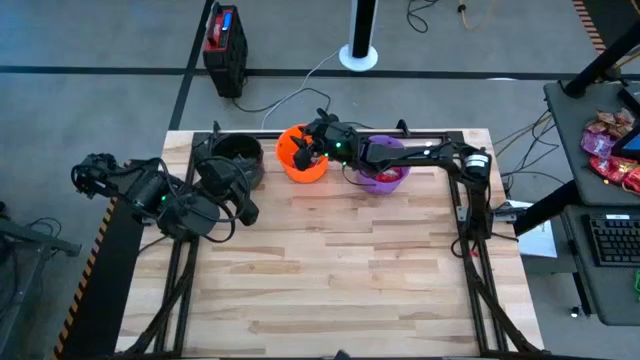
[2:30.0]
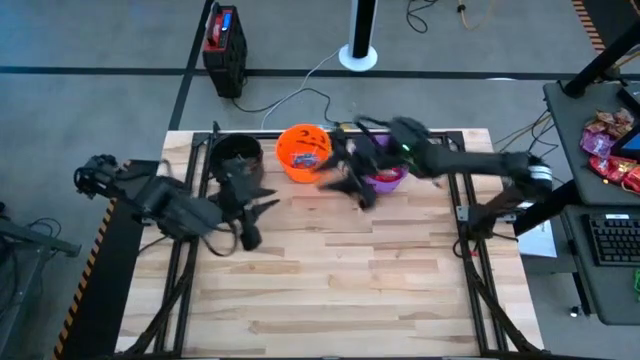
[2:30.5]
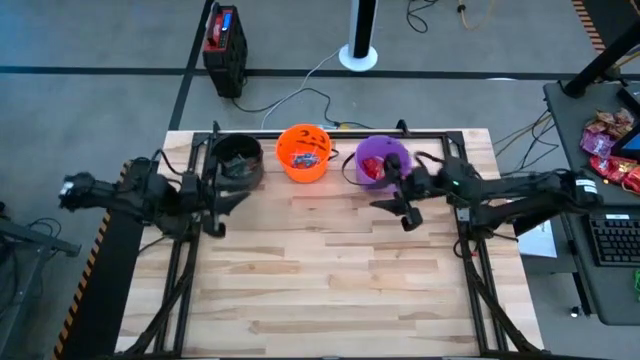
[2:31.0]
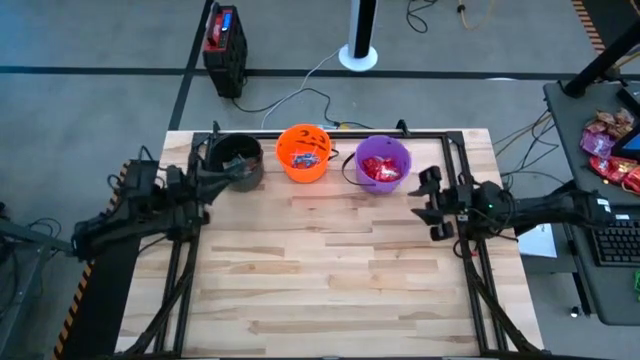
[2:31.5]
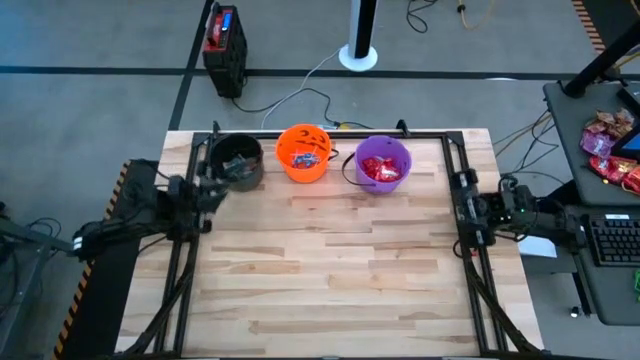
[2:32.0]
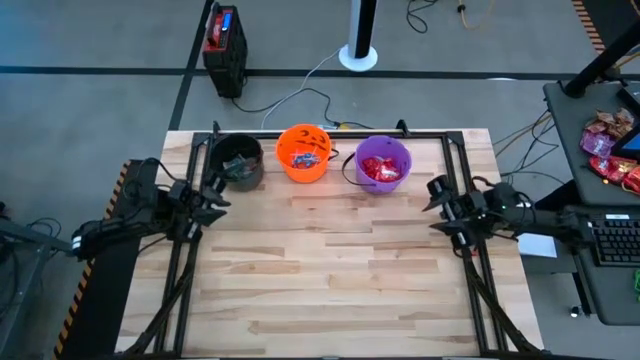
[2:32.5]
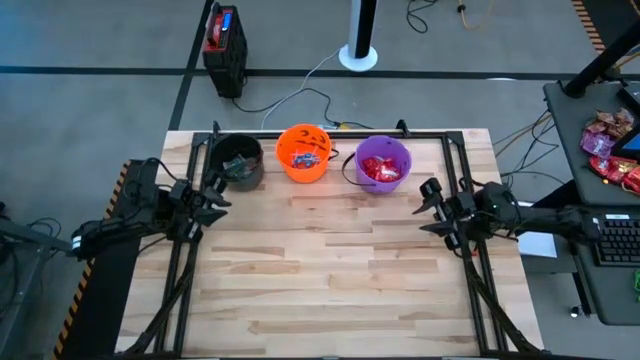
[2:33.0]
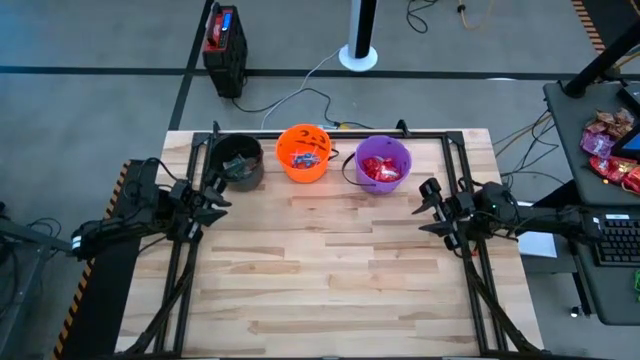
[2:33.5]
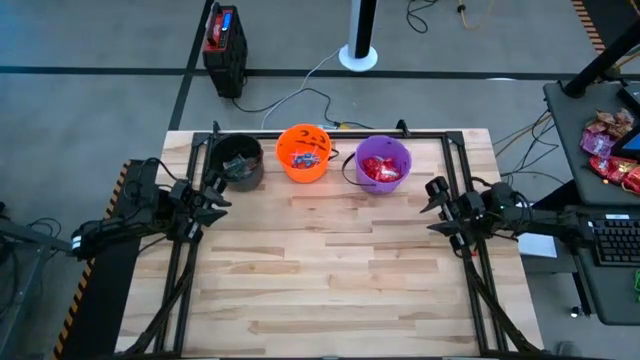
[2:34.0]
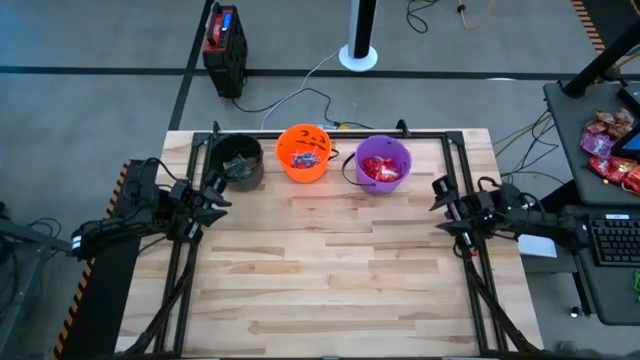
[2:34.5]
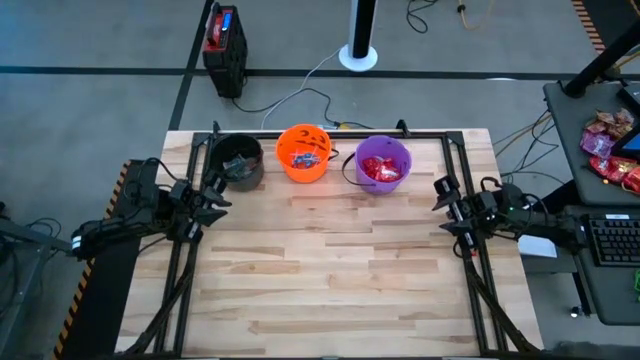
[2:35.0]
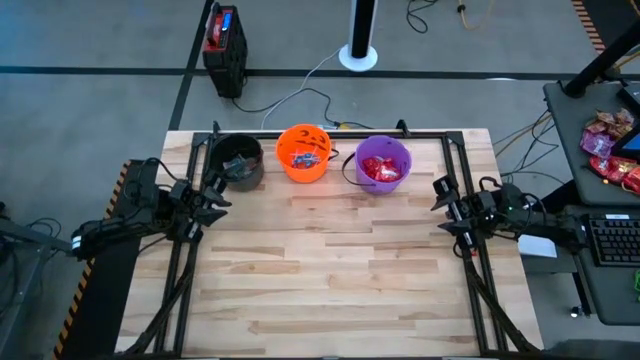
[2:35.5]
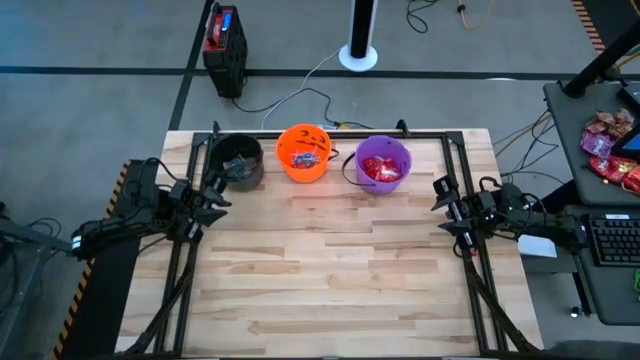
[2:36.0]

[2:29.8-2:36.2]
Task: Sort candy by brand, put in halloween buckets
Return to Home Position

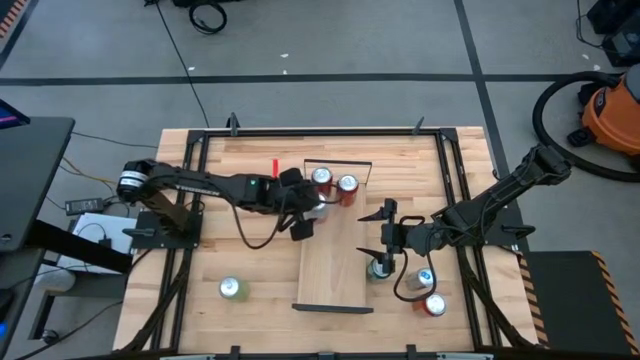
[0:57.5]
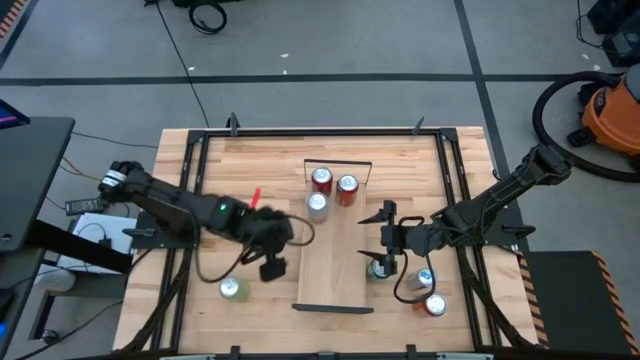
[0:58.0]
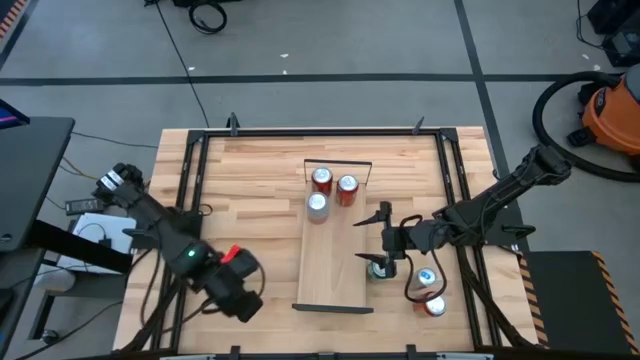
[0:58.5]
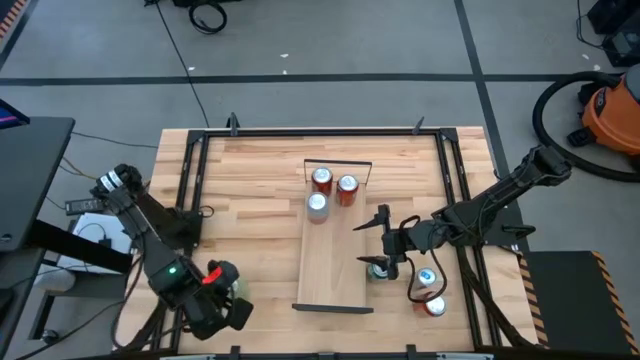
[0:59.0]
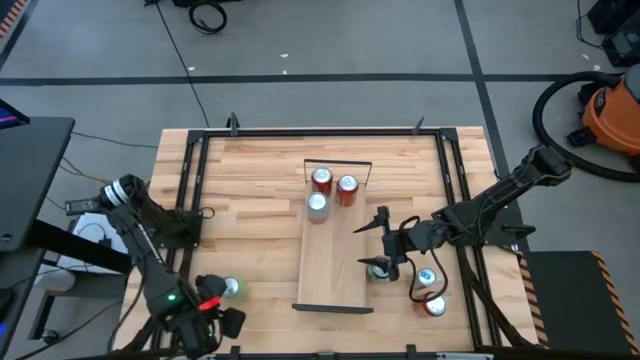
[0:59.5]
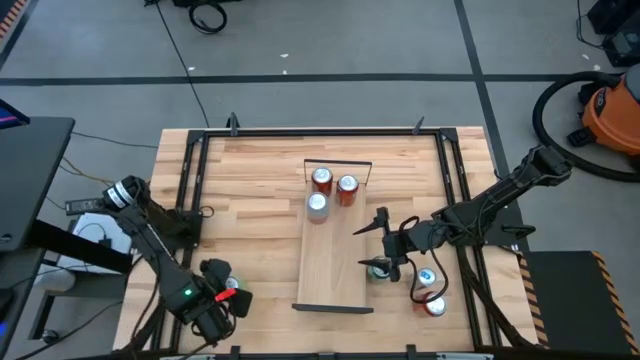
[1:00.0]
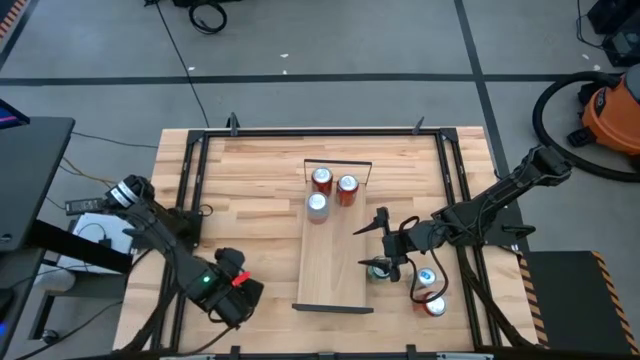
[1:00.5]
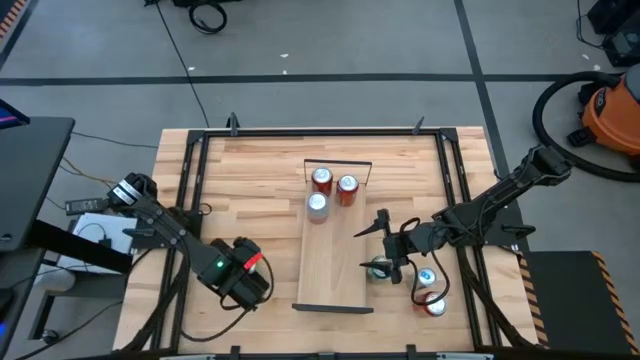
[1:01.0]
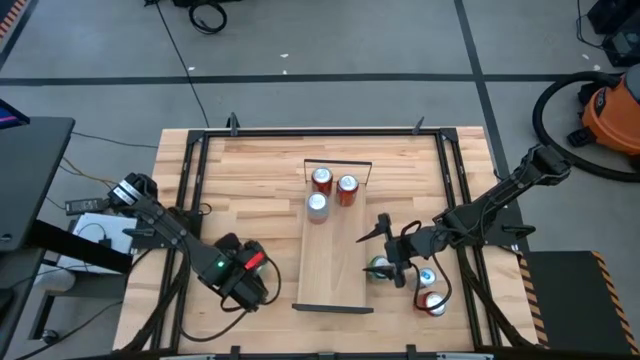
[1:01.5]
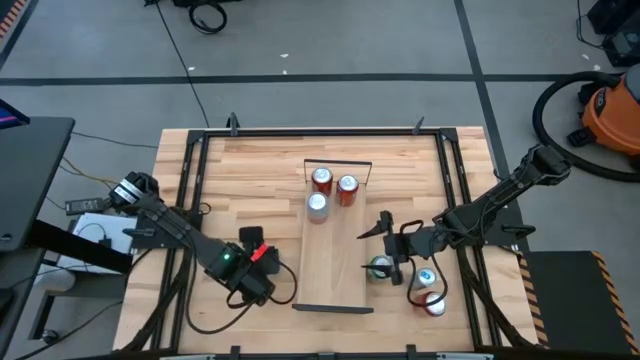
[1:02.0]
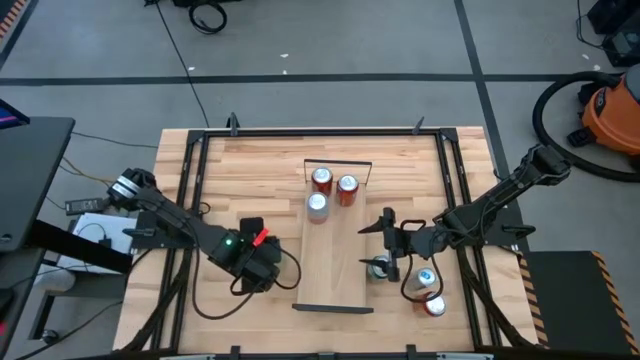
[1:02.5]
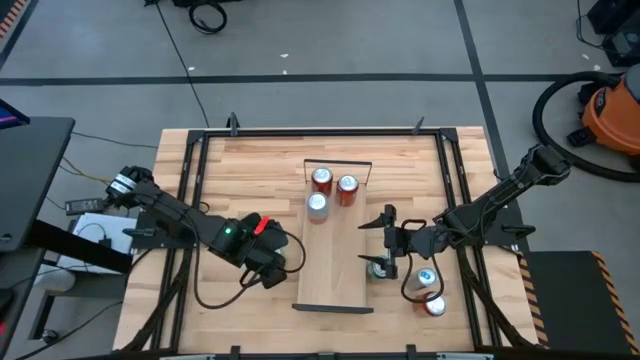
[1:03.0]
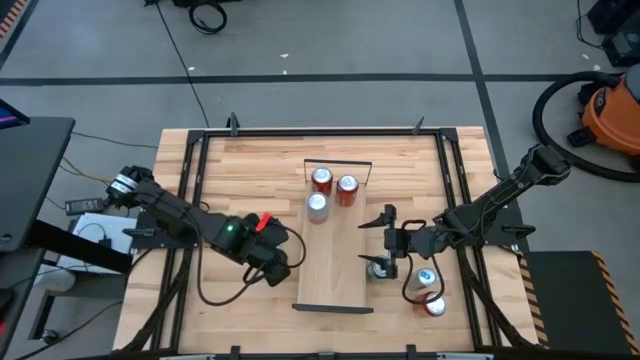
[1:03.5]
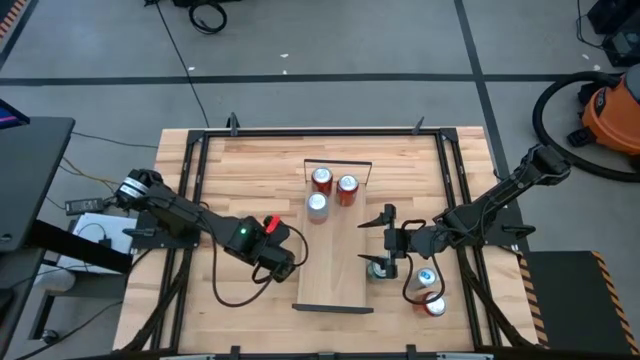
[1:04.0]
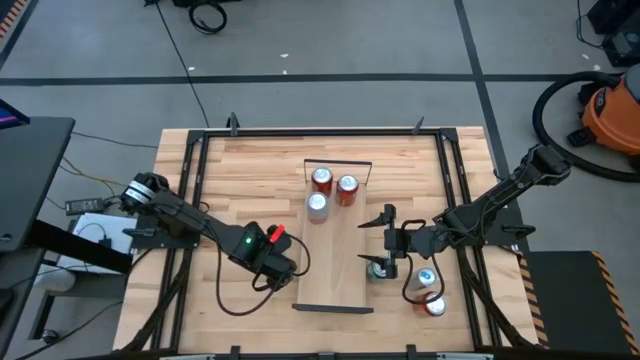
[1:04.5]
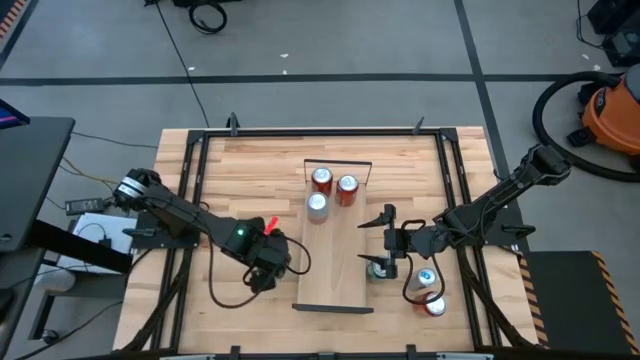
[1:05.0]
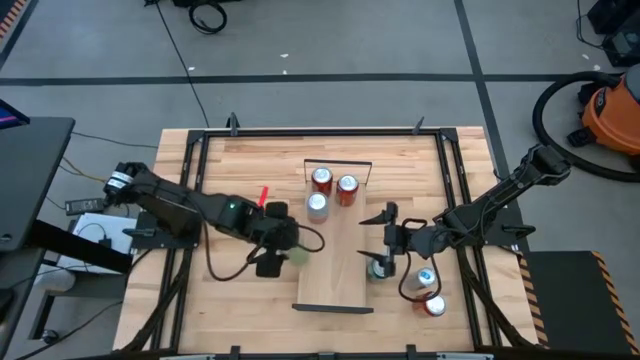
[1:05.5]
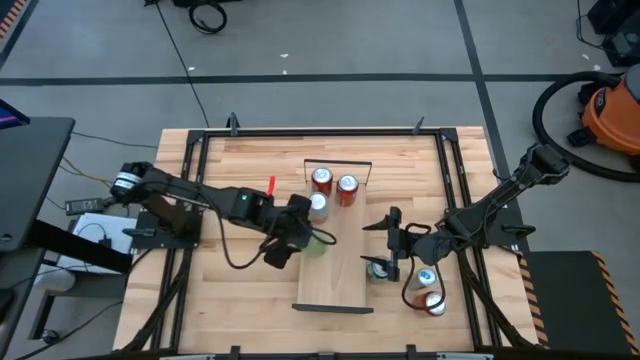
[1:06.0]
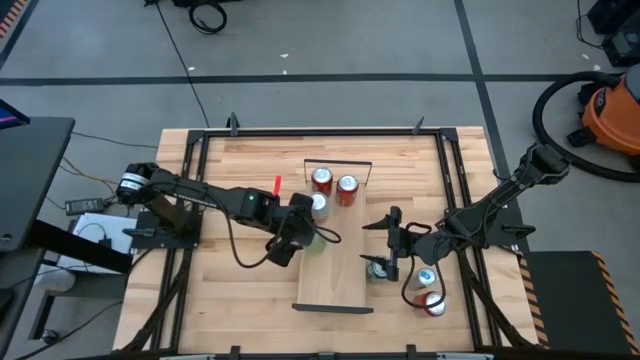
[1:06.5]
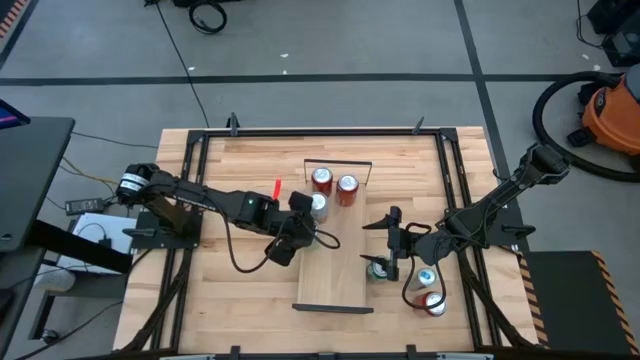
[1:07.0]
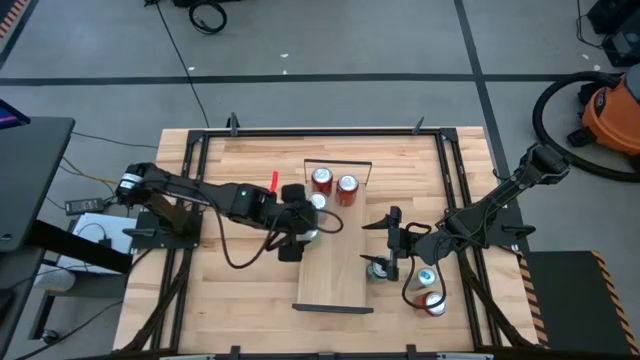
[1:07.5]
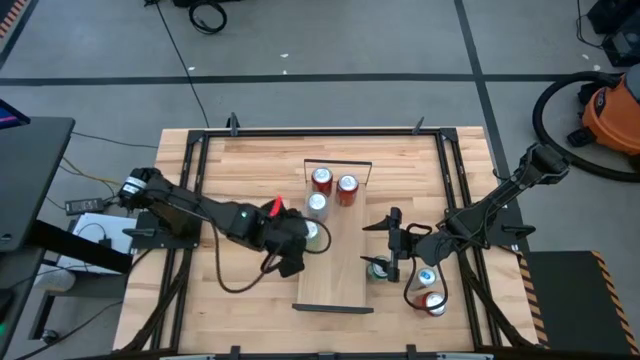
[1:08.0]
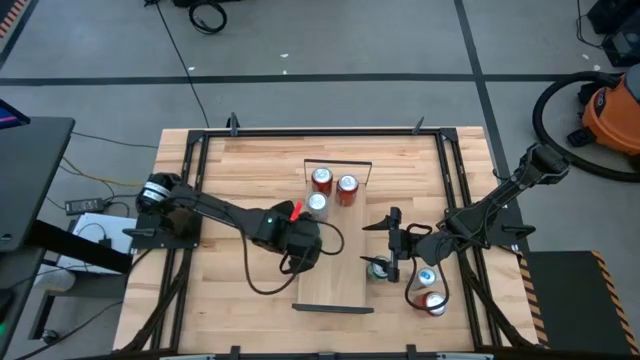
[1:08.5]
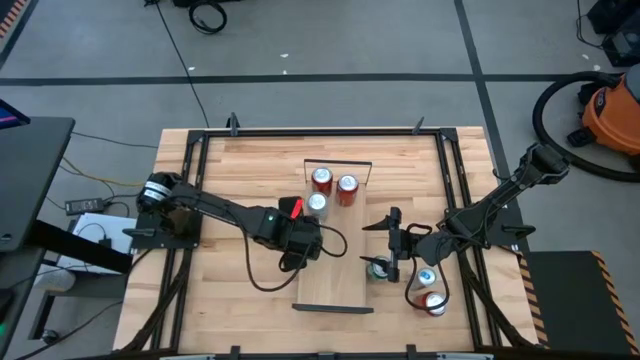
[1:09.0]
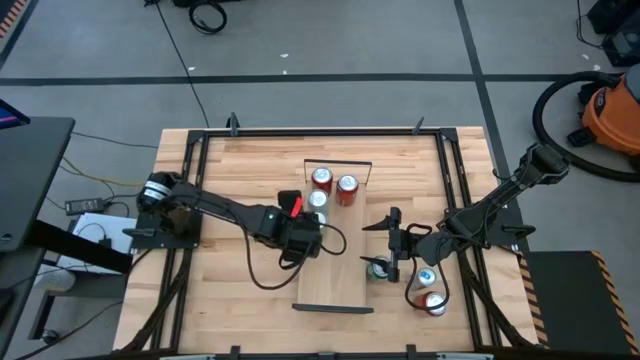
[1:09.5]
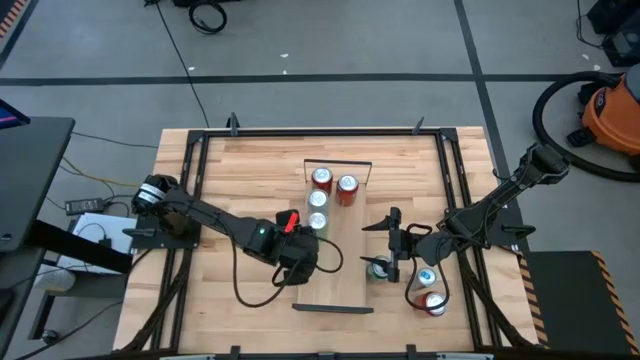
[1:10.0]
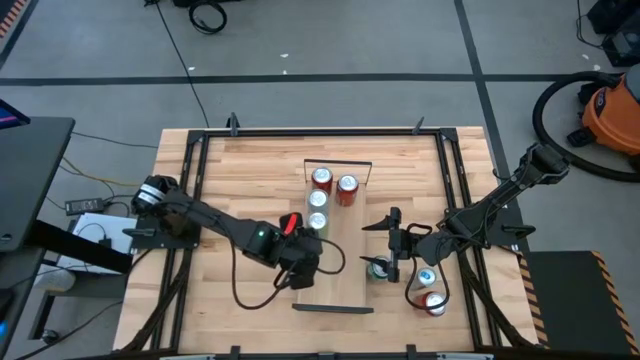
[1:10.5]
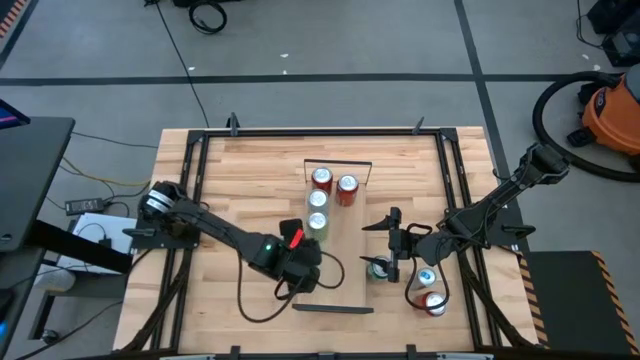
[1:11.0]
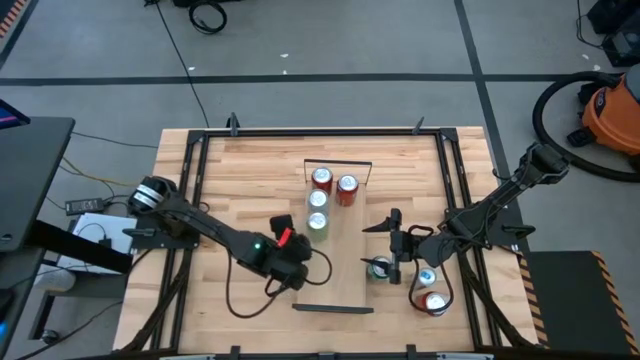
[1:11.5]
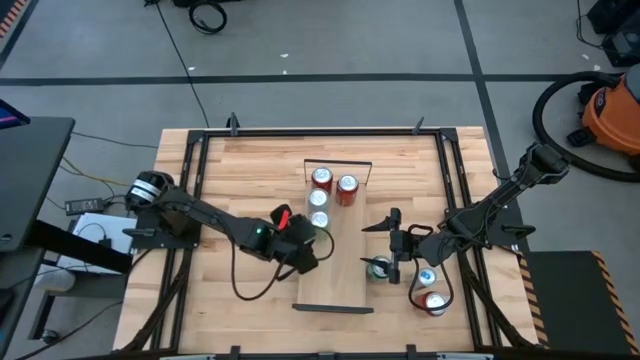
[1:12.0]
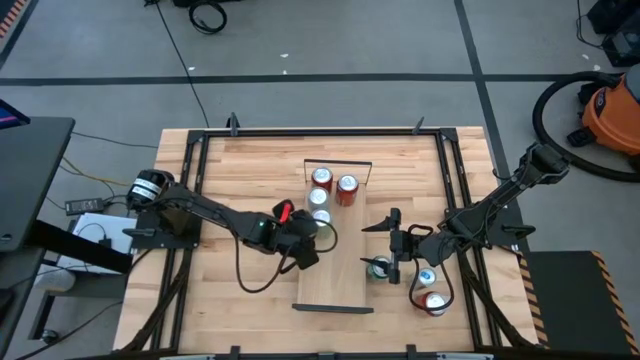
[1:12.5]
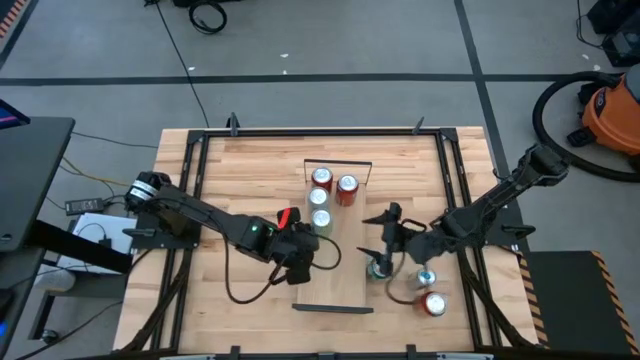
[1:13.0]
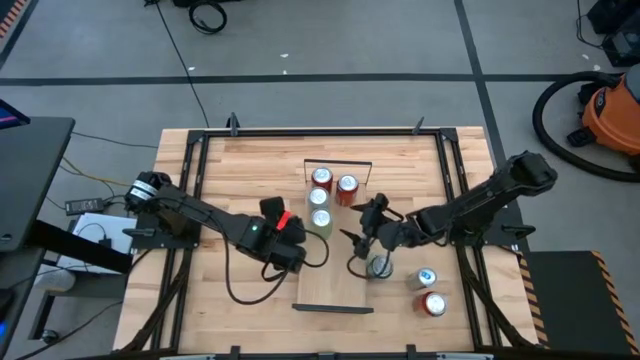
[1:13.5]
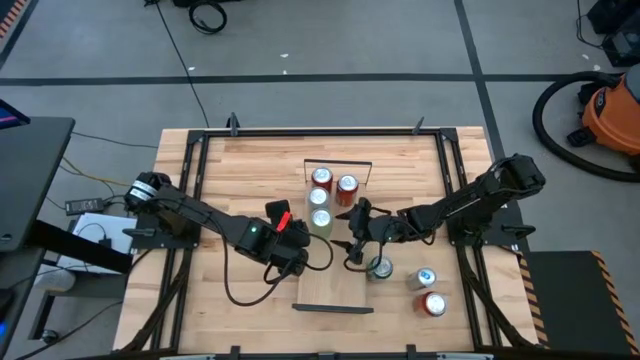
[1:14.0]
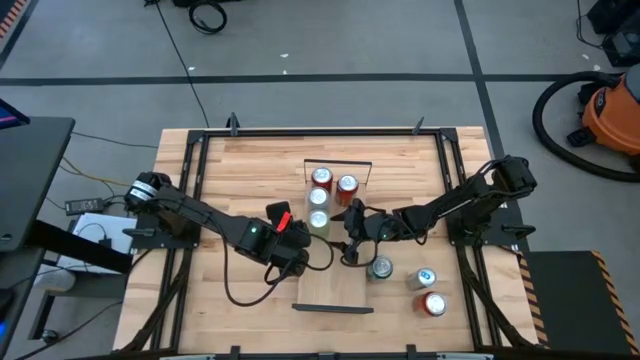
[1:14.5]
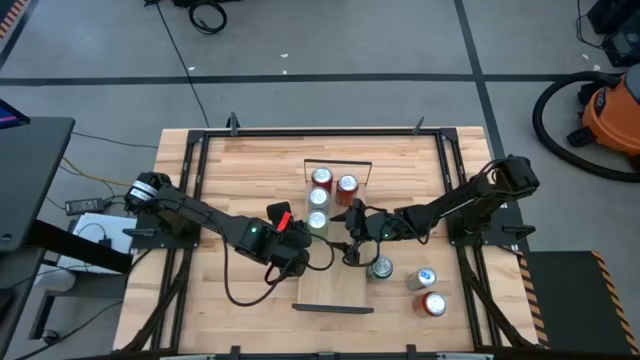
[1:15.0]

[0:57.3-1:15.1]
Task: Place canned beverage on shelf
Put the light green soda can on the shelf
